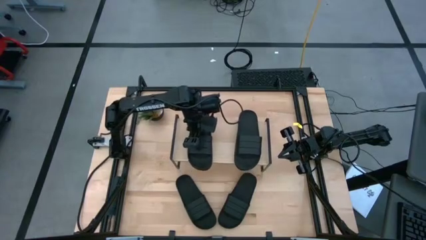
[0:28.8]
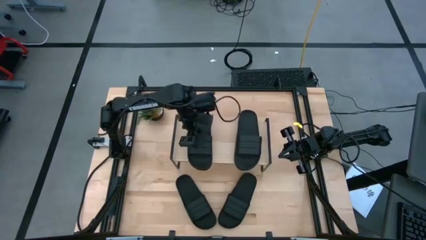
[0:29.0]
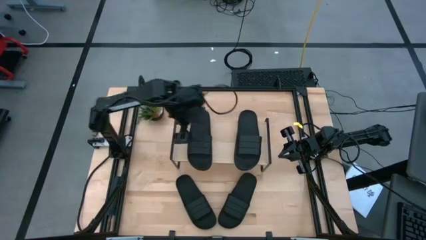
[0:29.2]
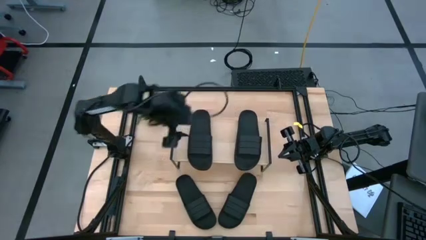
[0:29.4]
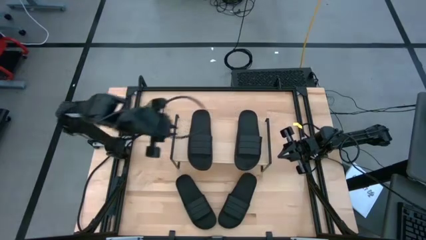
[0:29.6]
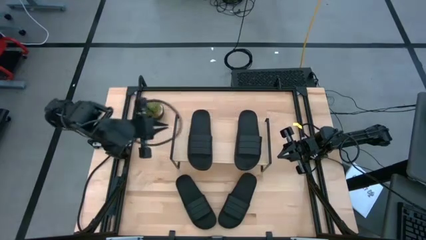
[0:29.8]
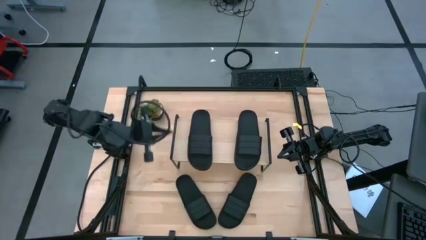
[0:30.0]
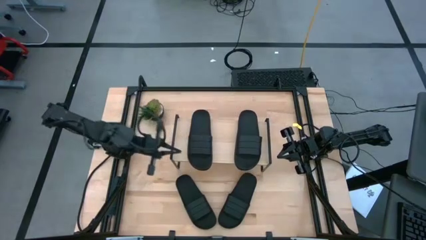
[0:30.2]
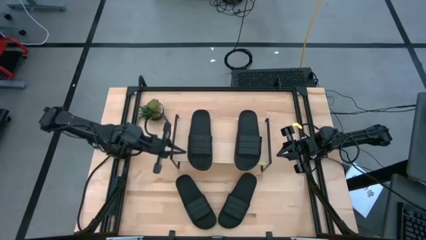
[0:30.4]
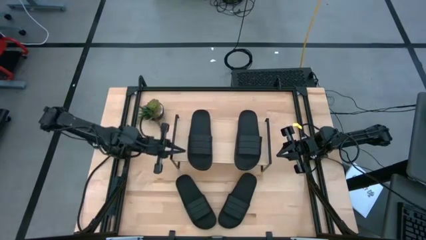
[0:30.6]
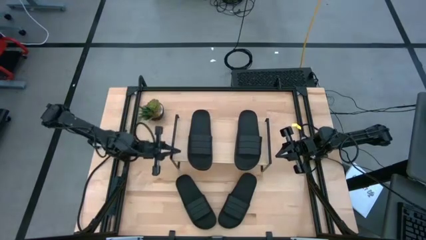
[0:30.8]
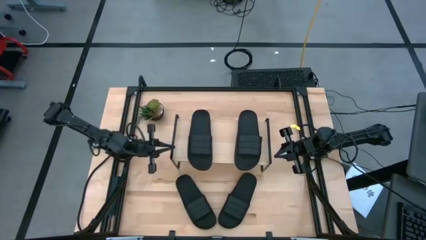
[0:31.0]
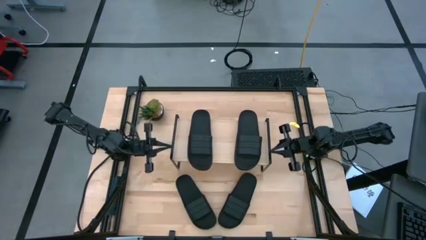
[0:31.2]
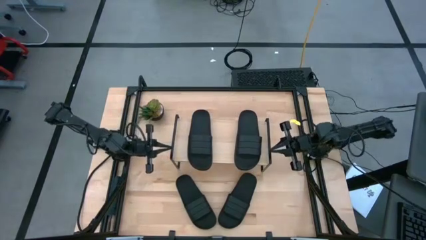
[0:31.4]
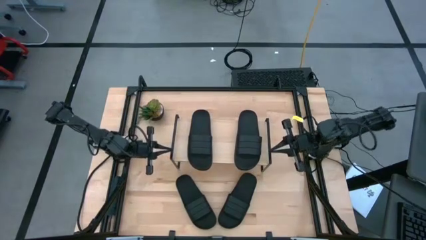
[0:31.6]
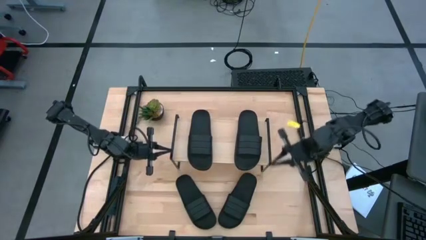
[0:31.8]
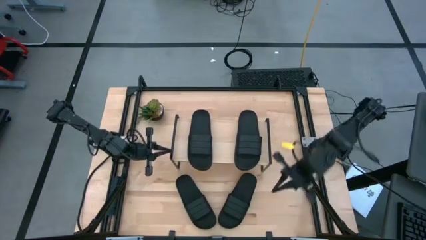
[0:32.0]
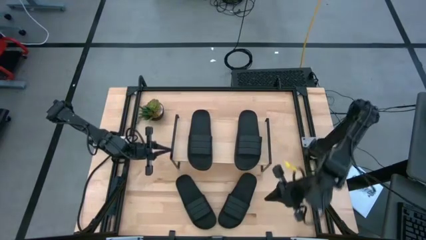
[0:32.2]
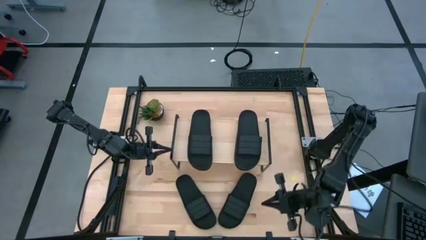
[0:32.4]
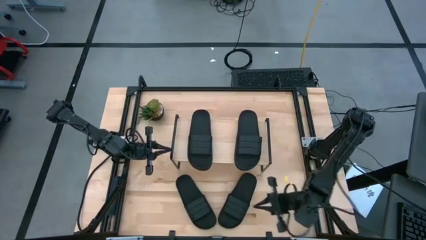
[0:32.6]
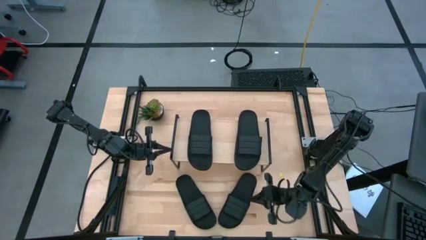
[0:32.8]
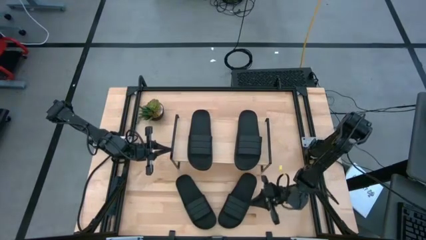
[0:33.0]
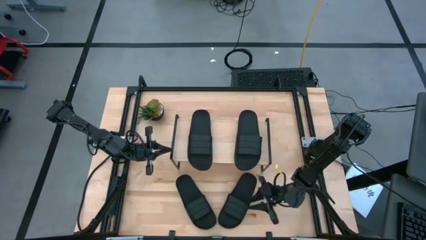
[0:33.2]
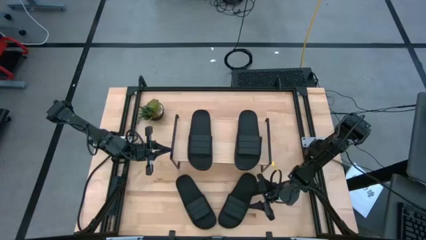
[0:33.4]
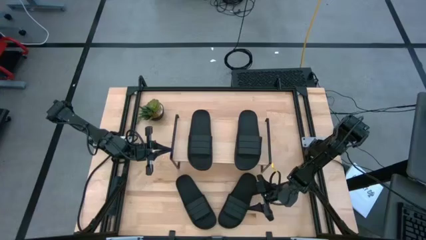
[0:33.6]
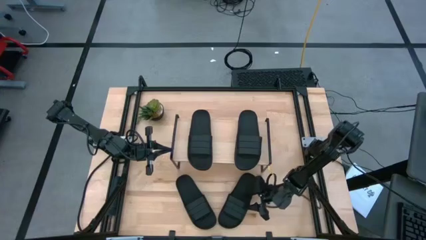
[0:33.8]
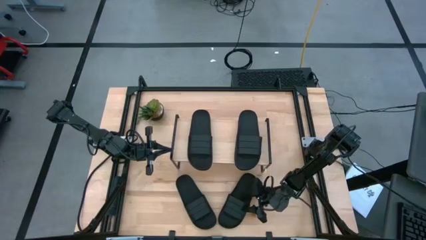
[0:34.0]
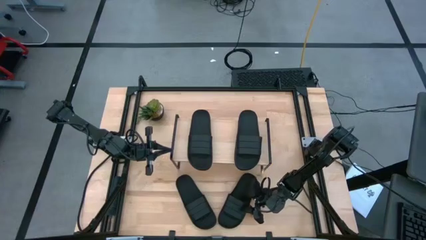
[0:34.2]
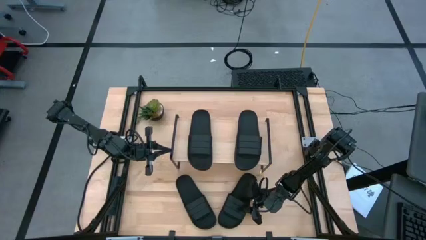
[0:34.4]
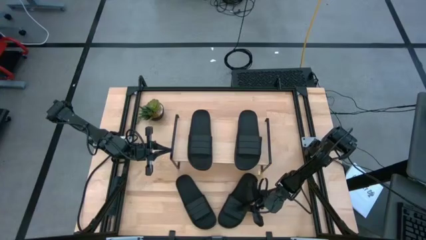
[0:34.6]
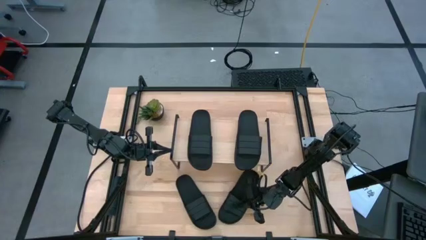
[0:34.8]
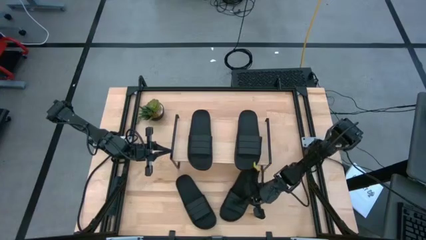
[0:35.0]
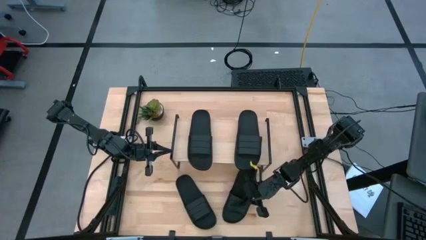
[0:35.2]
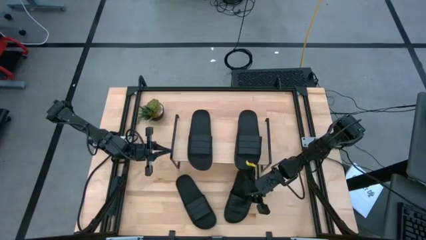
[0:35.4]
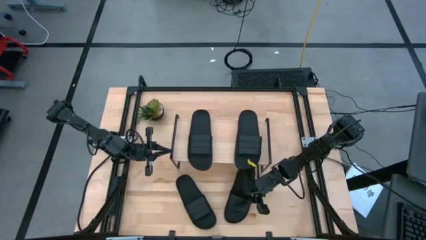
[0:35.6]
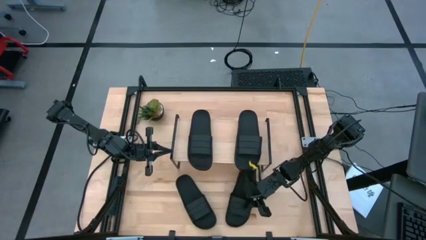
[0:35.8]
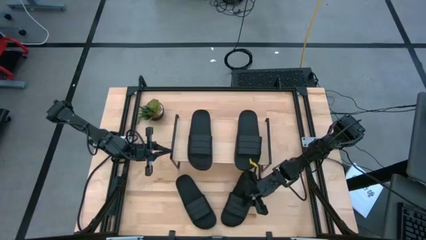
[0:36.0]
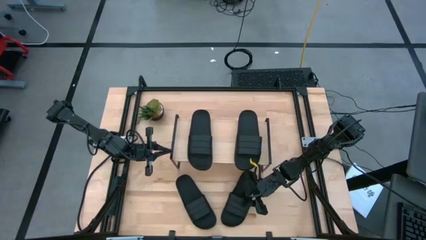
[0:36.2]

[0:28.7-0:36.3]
Task: Pick and place slides into the shelf
Put the black slide under the shelf

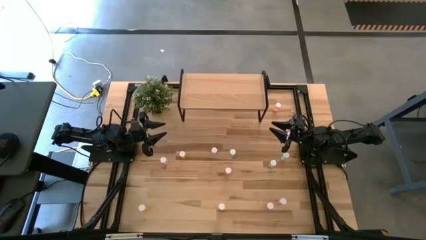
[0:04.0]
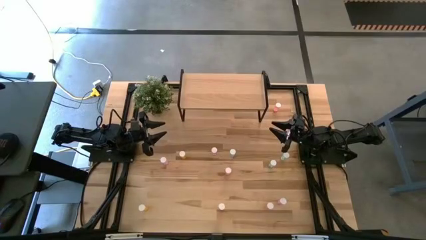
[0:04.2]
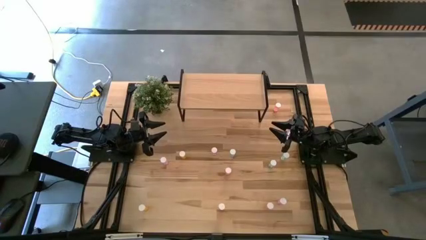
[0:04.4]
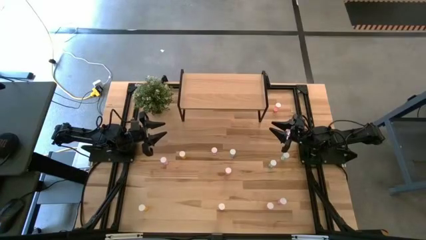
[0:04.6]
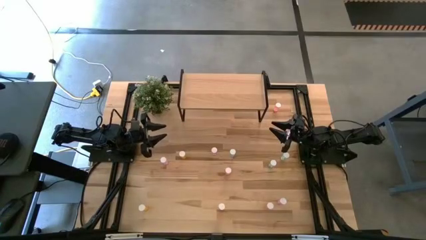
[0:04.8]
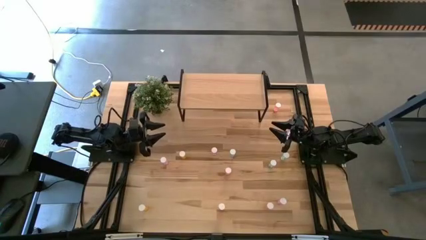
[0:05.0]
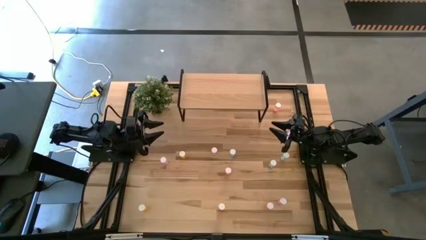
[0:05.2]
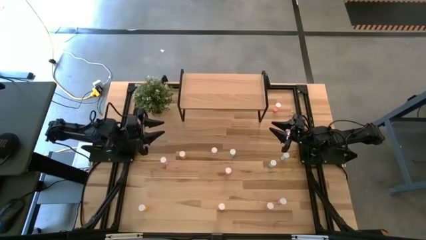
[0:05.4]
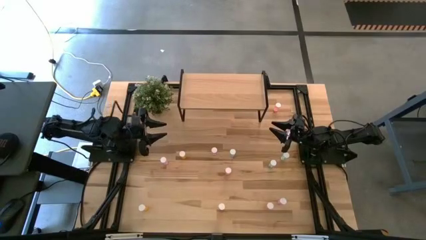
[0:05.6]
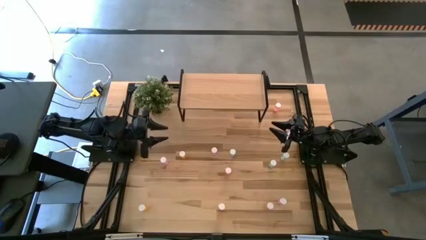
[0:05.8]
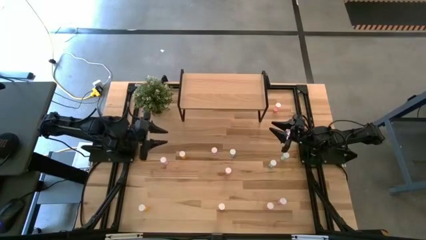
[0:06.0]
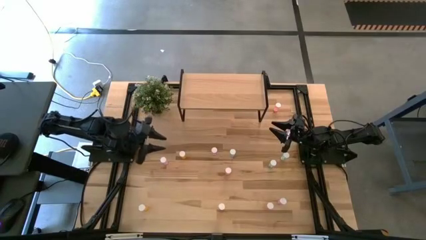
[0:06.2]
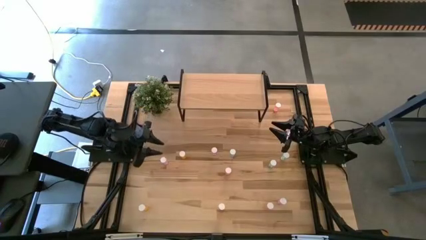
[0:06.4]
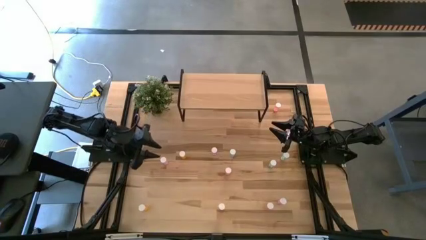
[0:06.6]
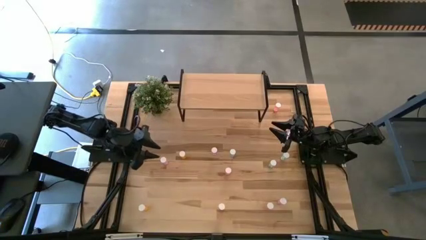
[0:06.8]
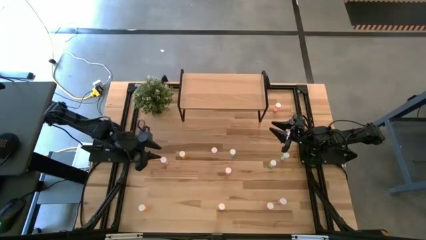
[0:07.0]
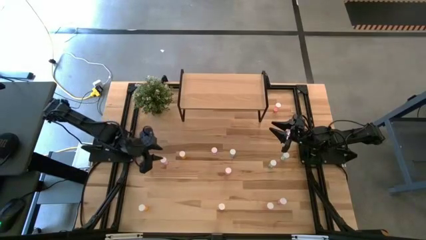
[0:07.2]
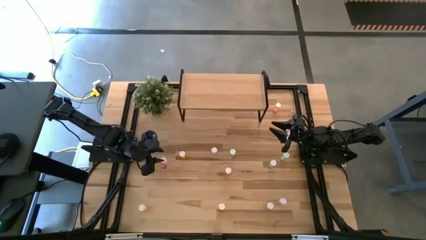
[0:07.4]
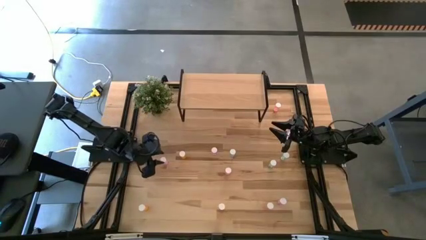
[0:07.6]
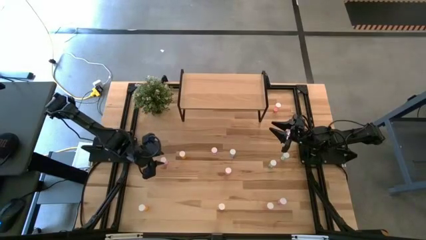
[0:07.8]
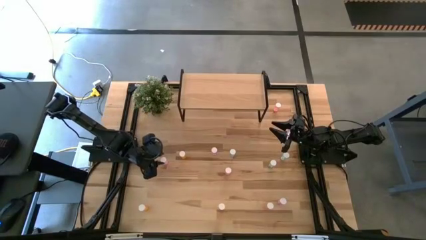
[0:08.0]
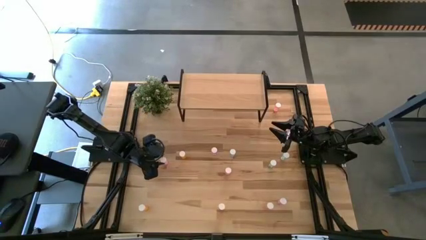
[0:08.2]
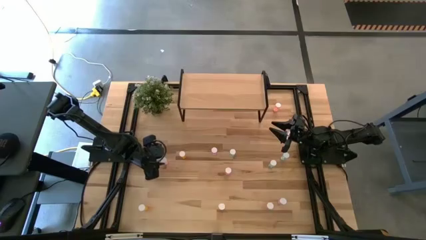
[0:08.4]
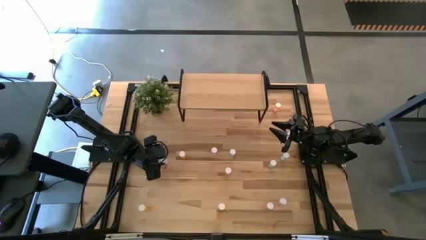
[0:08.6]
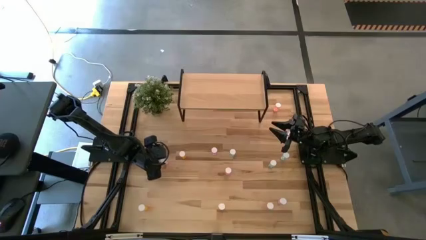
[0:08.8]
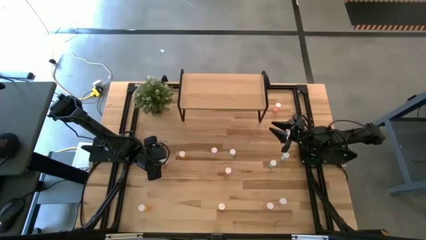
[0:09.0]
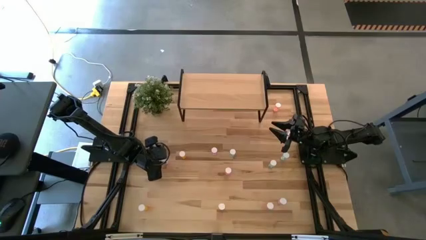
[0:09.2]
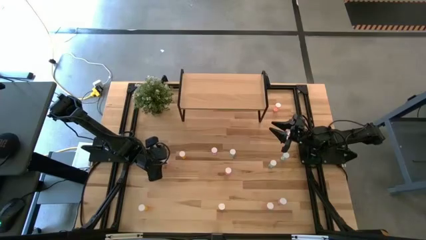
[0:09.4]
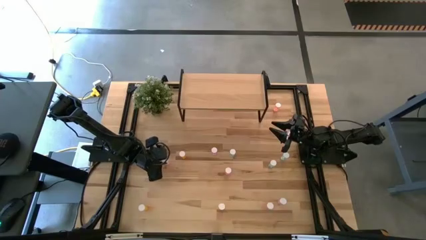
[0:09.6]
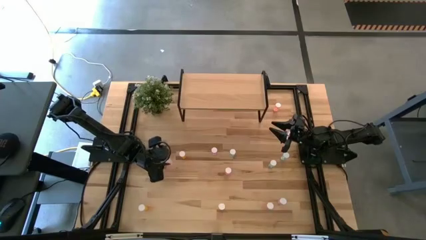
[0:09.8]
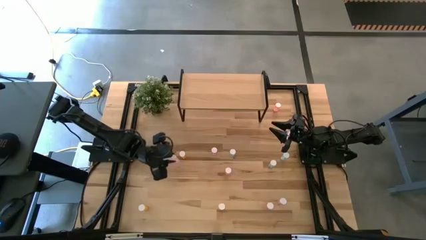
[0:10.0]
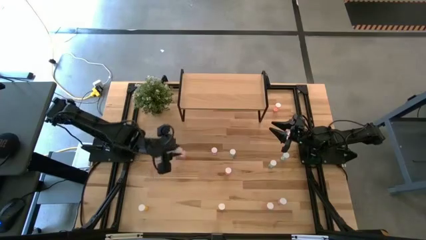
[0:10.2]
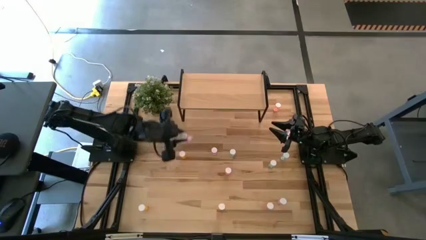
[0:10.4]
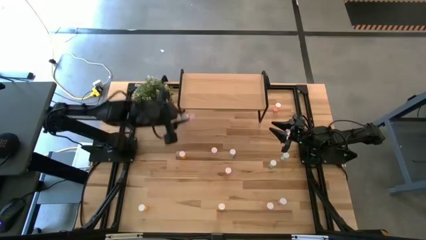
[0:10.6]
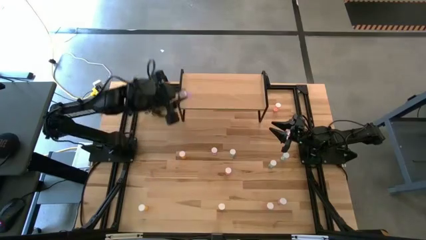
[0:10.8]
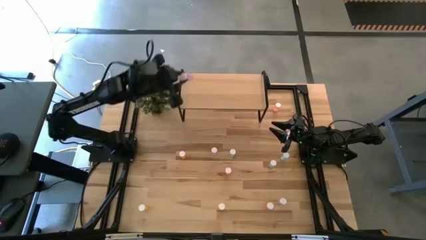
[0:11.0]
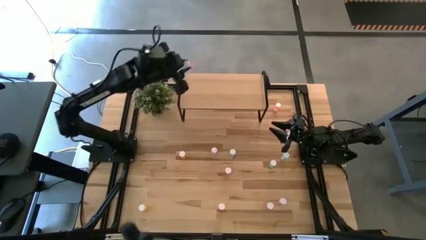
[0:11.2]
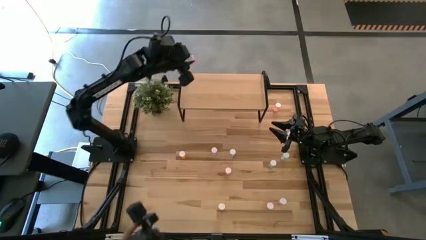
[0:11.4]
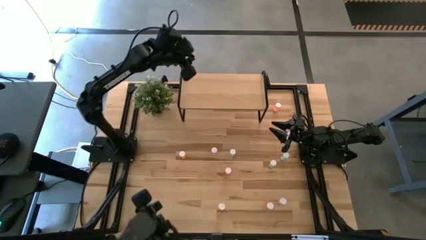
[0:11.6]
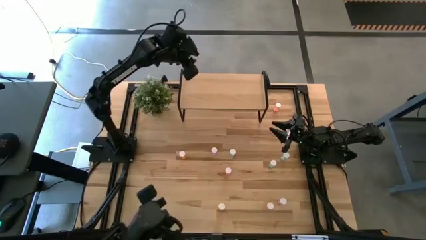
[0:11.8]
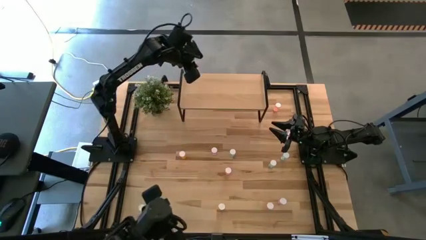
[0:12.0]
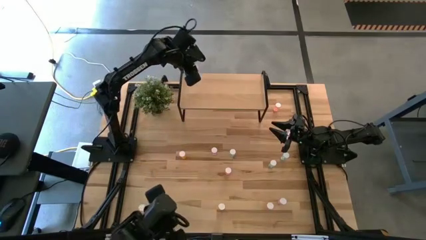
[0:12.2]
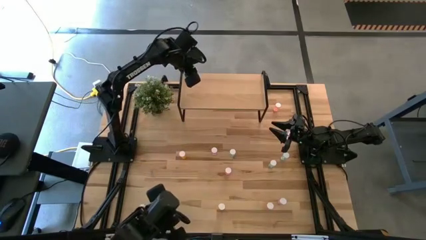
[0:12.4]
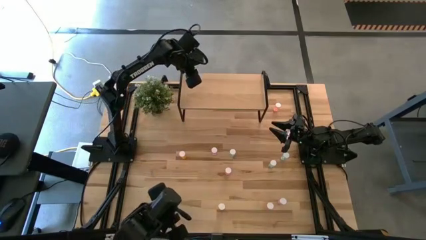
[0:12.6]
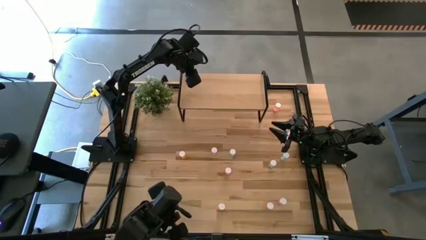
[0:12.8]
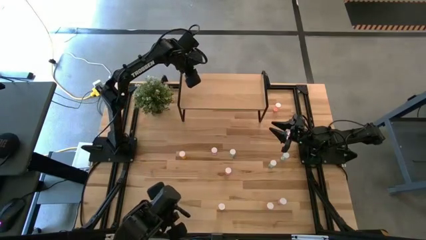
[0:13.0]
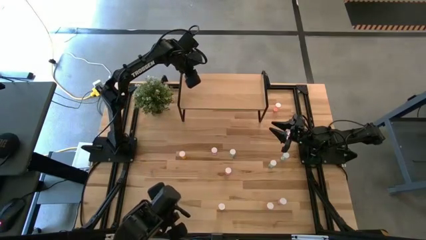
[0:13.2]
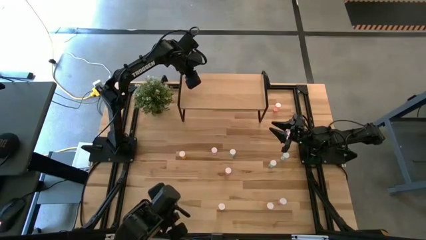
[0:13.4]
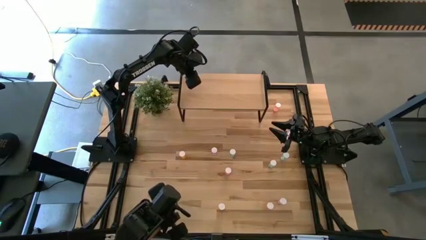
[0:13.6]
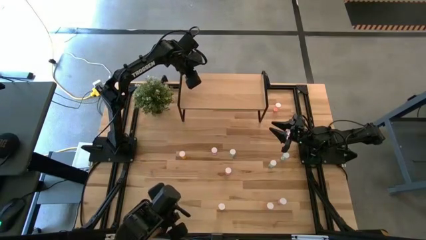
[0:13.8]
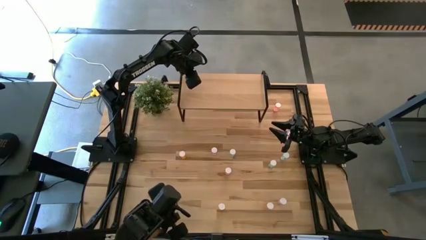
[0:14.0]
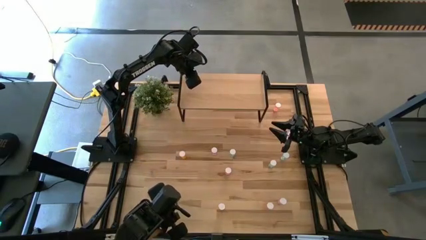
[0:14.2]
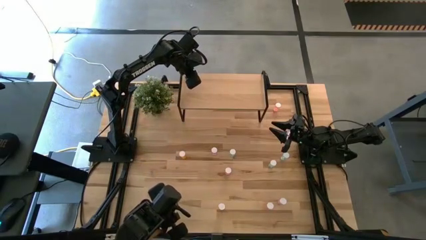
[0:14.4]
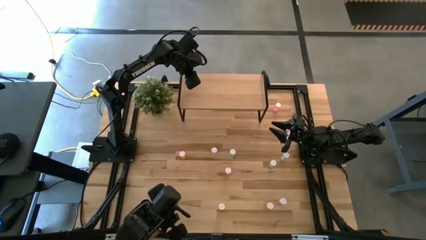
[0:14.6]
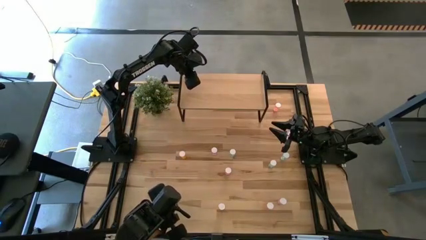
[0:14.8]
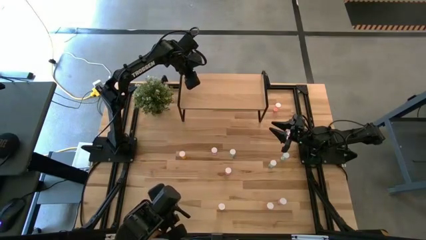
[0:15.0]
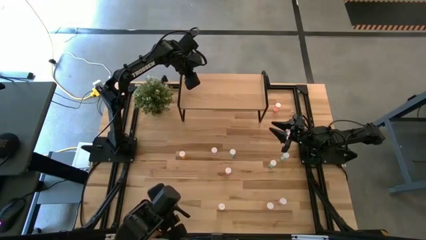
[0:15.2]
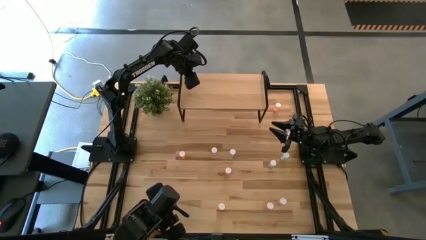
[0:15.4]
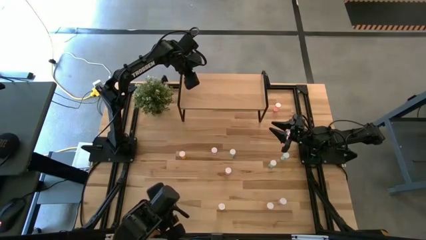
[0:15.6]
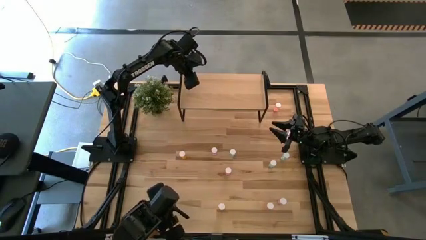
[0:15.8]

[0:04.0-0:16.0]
Task: Pick and place medicine bottles onto shelf by color
Put the top left violet pill bottle on the shelf
